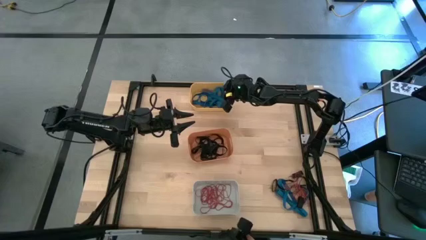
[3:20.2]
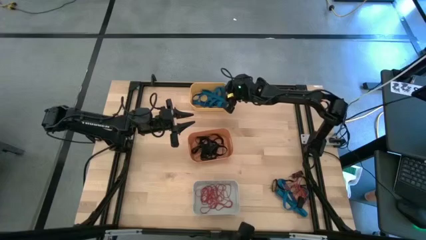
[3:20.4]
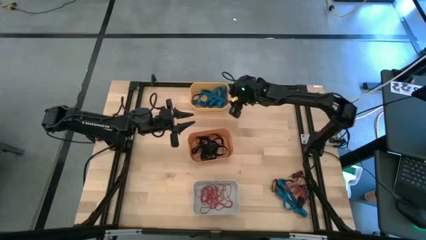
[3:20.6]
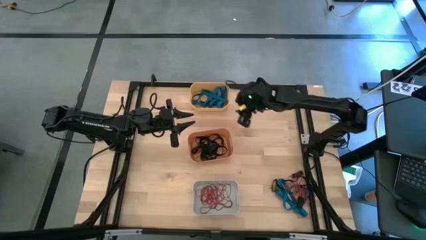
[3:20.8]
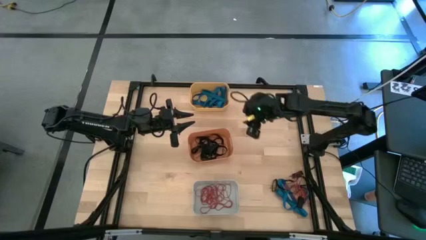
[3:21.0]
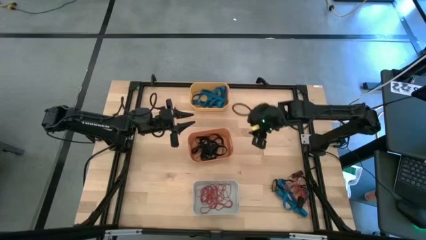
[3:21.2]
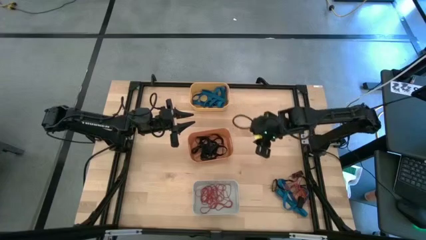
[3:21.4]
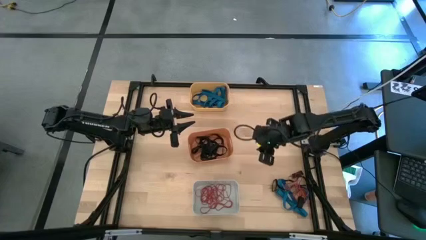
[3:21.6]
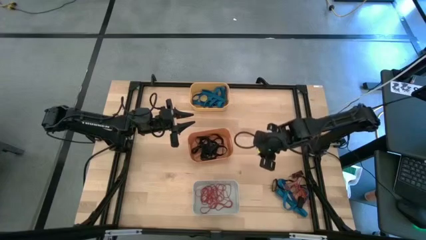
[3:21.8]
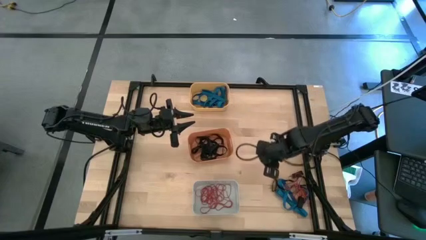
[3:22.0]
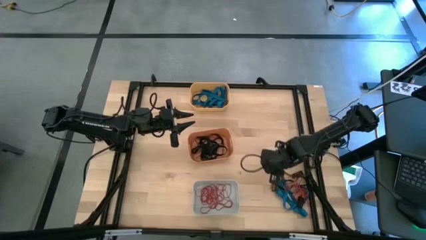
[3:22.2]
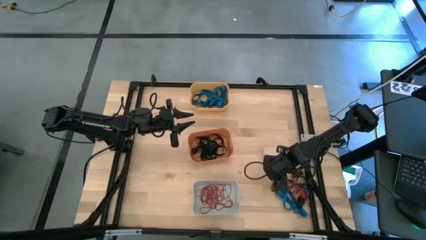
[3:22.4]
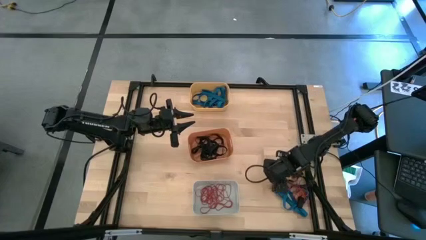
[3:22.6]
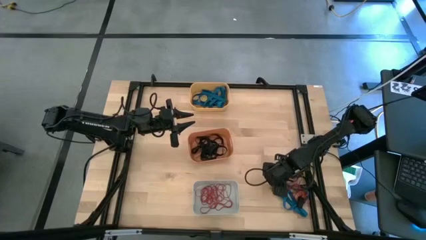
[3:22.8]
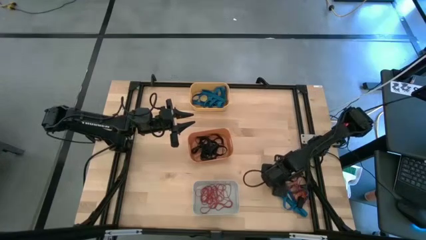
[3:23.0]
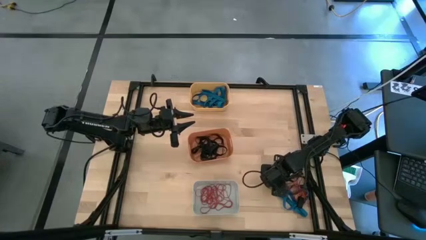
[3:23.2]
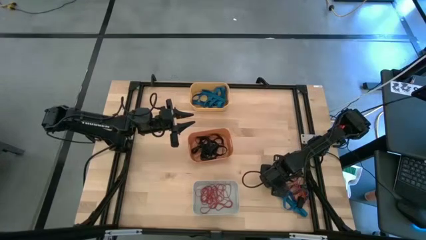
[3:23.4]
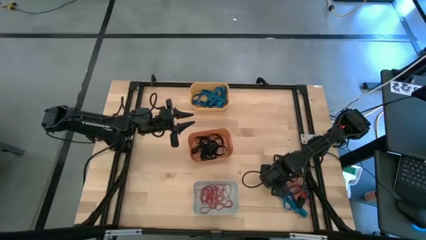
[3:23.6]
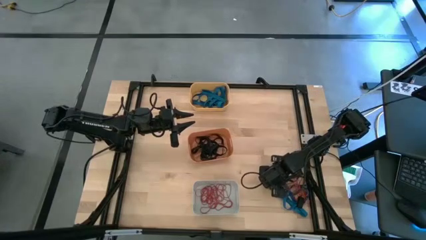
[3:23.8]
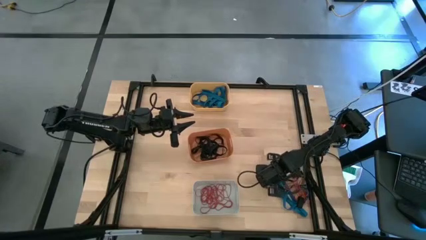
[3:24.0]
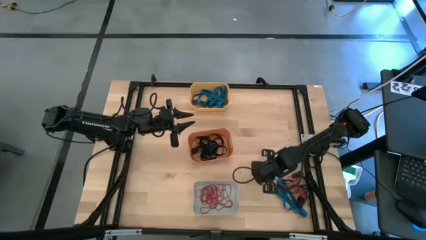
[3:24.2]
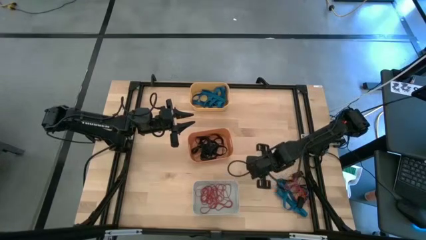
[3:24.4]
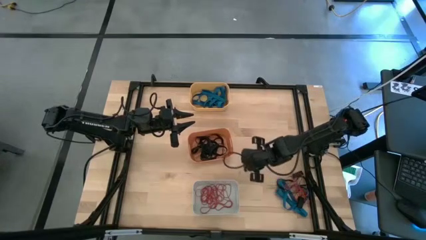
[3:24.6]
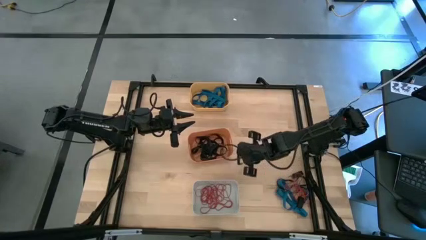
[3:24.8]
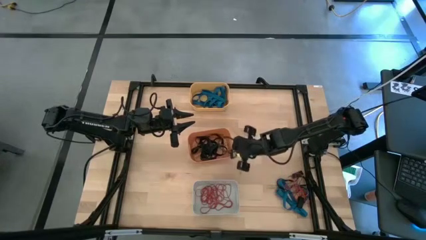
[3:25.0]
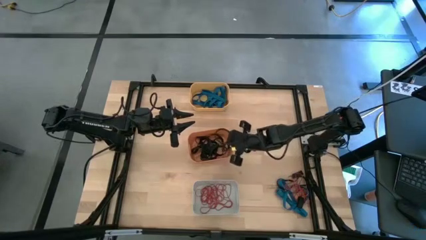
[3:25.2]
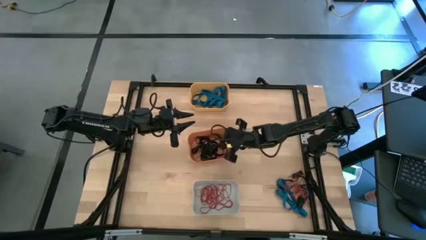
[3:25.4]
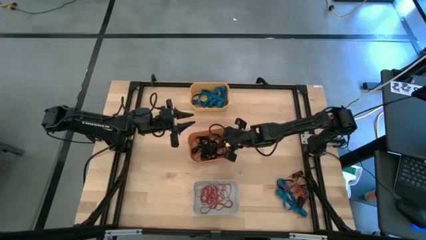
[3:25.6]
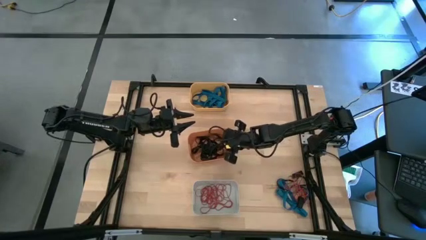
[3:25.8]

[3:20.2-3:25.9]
Task: Sort rubber bands into baskets
Put the black rubber band in the orange bin

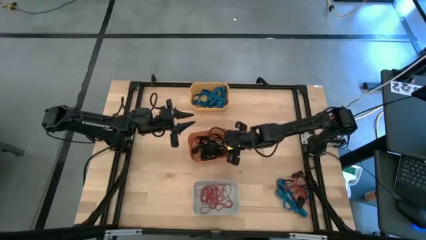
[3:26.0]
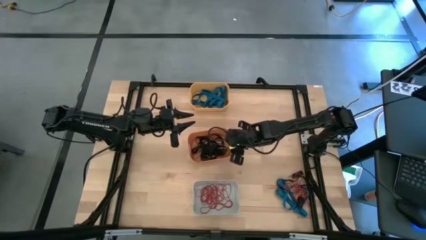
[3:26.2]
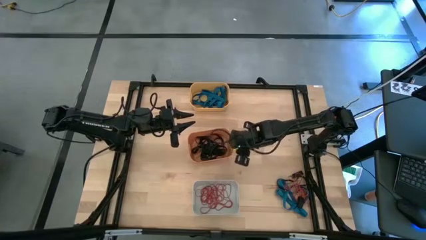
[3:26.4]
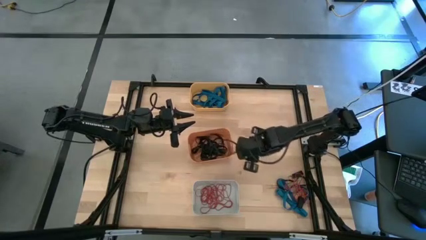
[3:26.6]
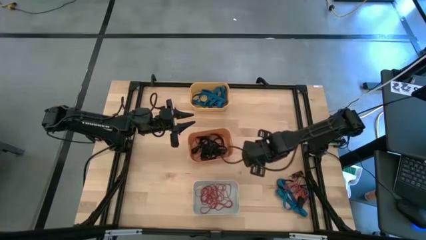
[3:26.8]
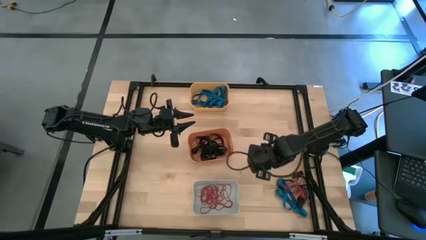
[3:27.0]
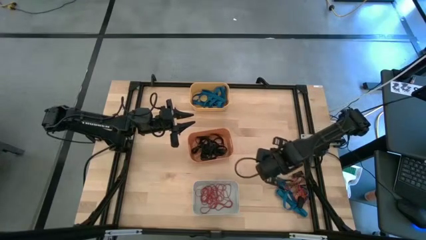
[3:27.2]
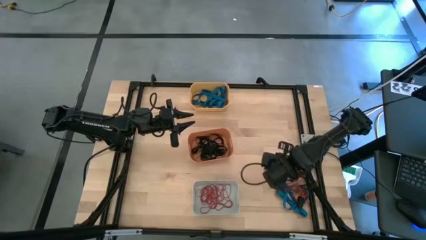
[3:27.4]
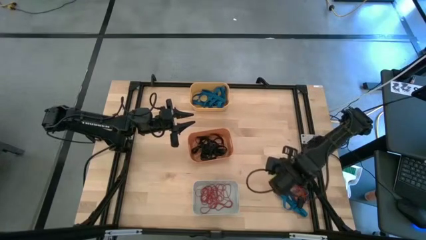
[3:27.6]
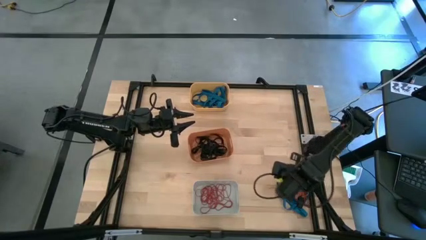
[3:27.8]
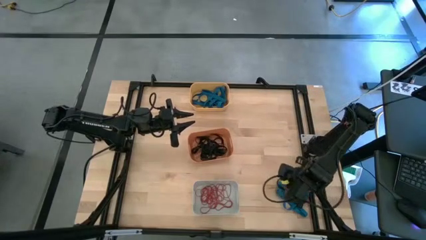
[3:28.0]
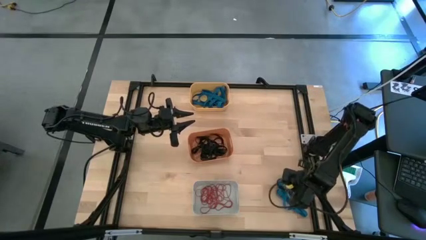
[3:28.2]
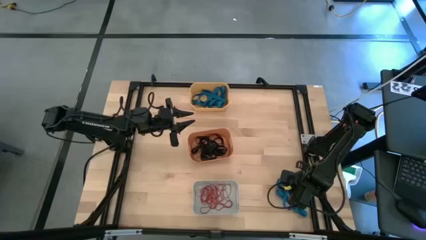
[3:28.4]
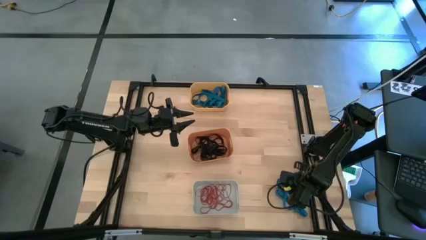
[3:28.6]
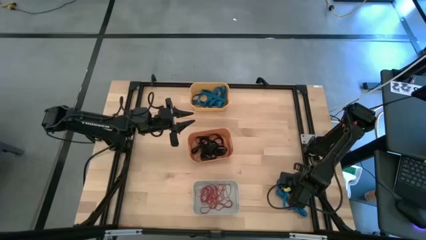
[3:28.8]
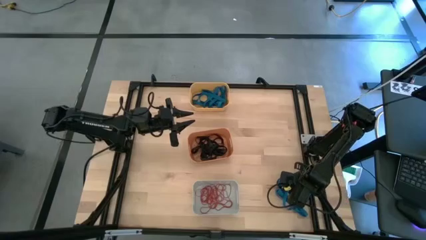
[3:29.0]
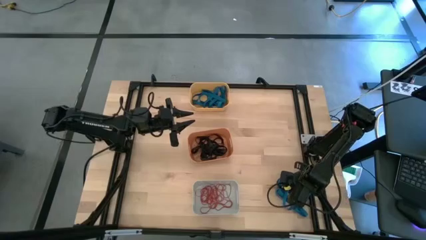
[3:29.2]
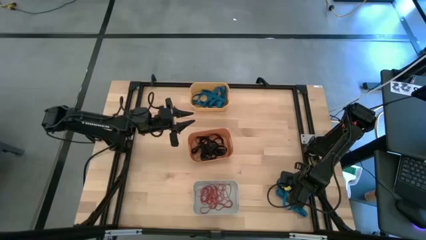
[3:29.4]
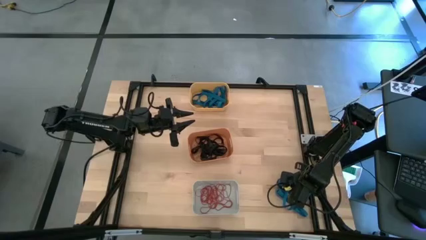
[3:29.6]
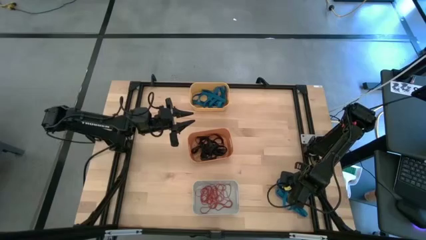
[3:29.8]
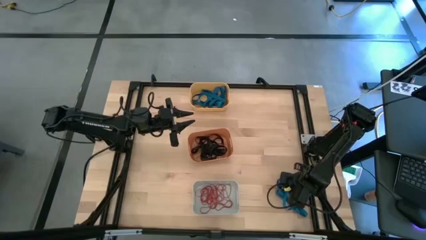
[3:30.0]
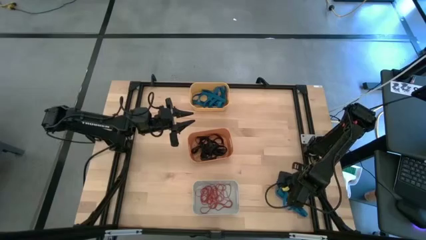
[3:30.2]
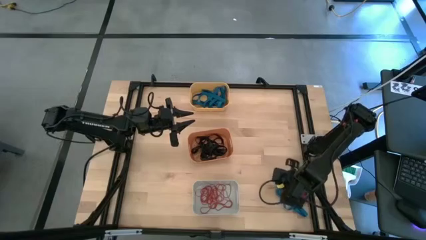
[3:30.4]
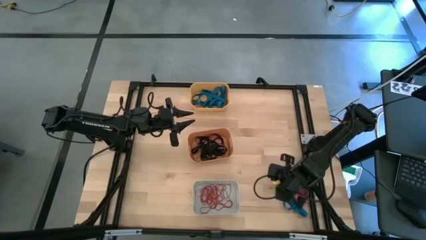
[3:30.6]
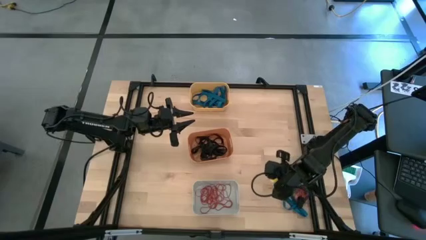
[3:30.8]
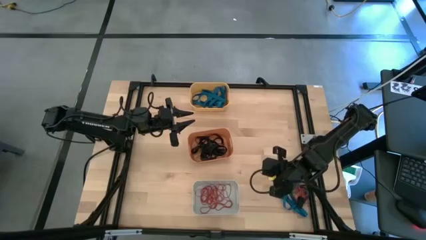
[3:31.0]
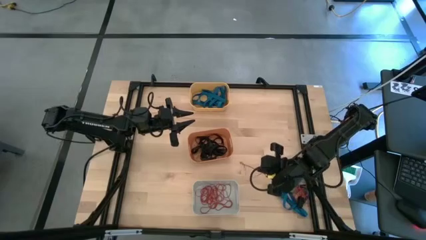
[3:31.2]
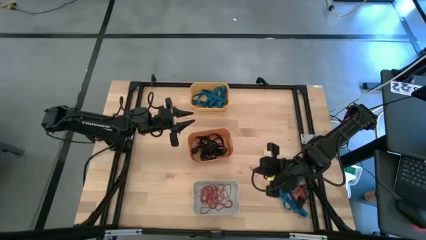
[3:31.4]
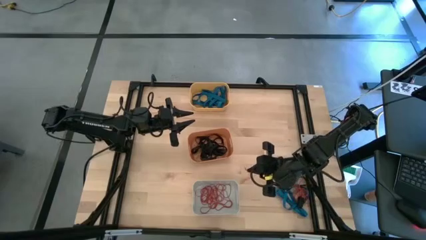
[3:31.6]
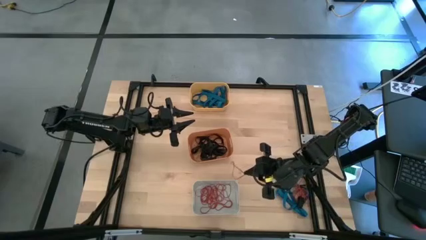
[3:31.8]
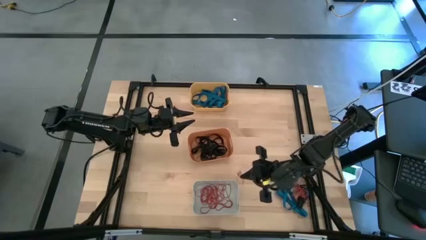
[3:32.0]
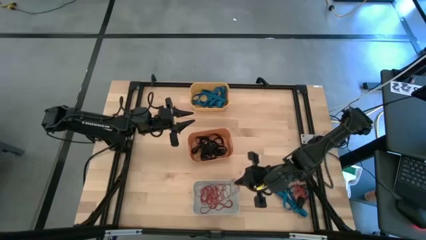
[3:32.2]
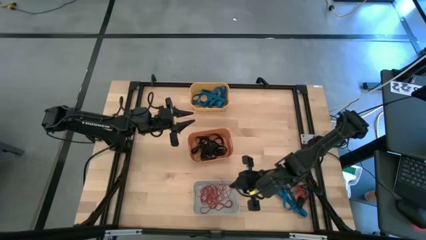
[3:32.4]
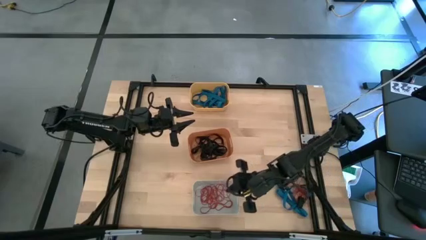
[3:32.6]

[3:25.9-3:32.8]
Put the red rubber band in the white bin

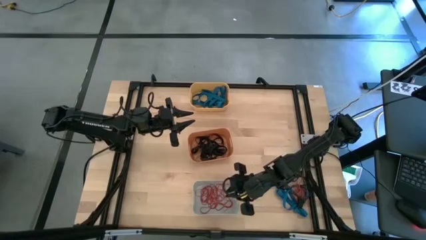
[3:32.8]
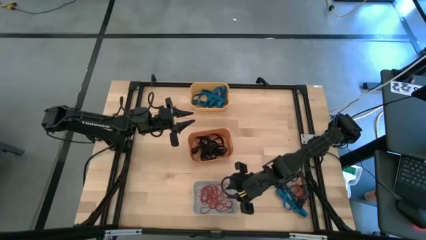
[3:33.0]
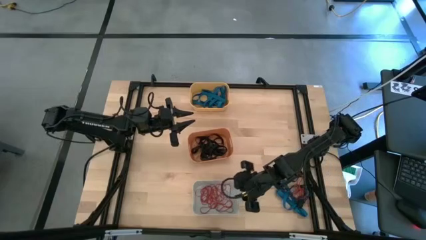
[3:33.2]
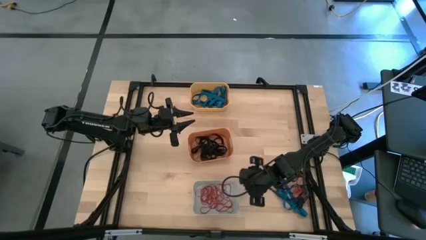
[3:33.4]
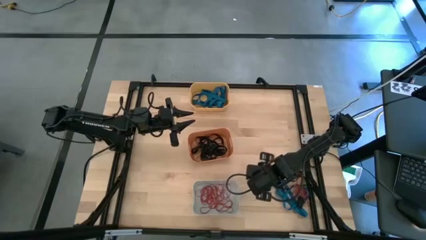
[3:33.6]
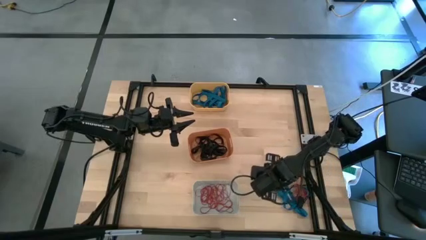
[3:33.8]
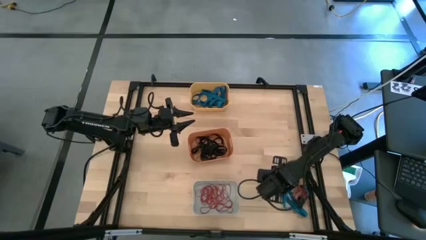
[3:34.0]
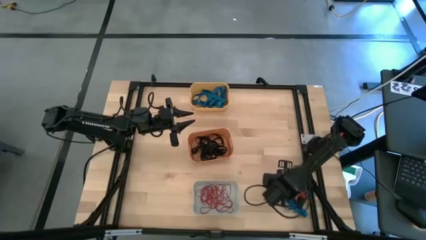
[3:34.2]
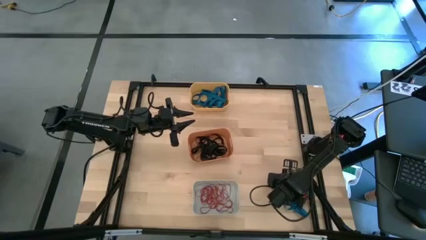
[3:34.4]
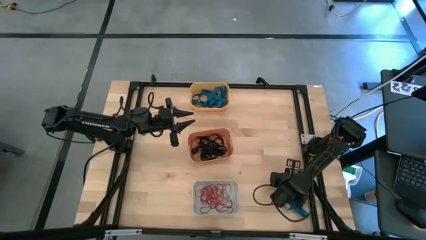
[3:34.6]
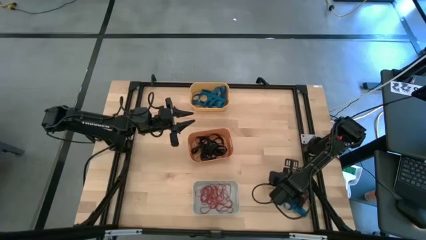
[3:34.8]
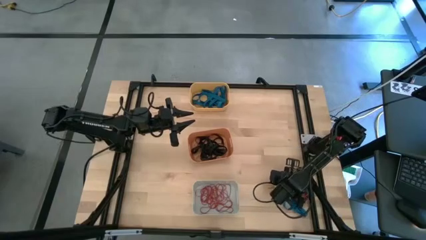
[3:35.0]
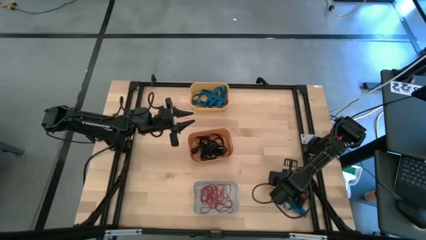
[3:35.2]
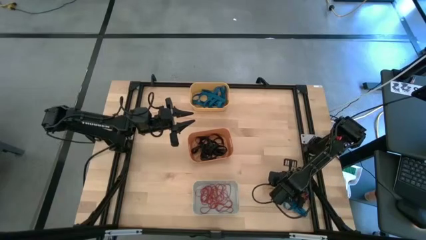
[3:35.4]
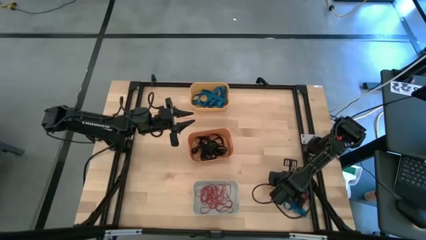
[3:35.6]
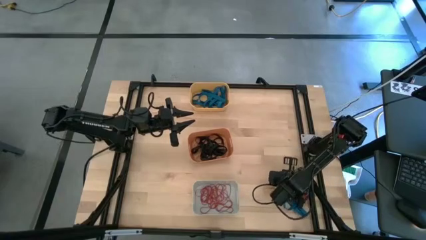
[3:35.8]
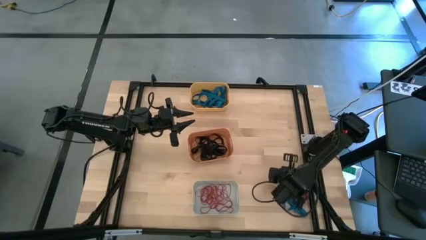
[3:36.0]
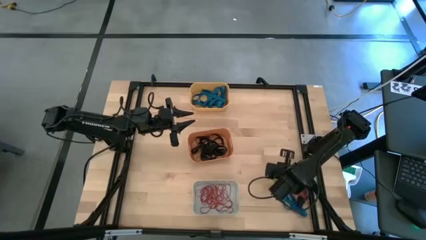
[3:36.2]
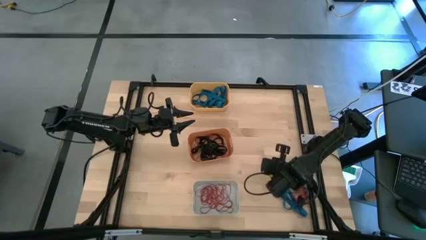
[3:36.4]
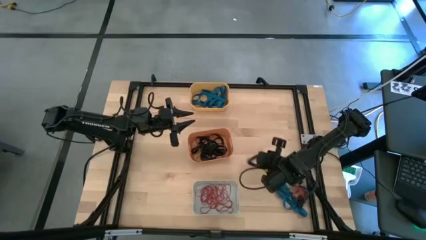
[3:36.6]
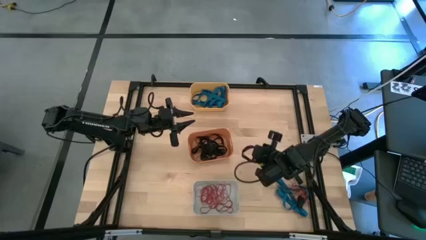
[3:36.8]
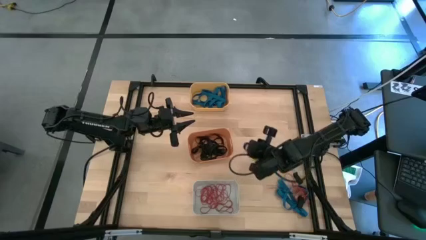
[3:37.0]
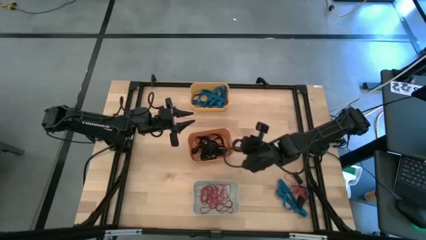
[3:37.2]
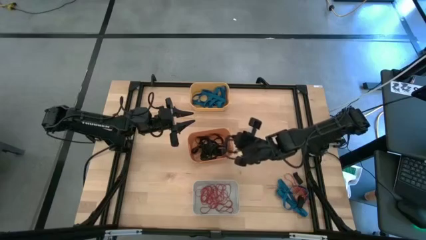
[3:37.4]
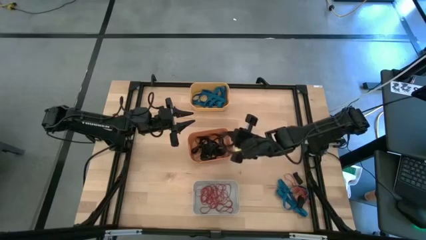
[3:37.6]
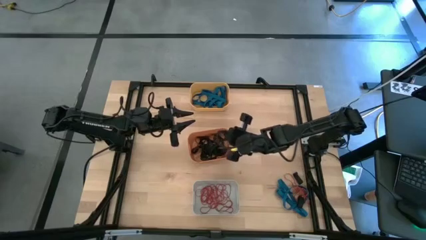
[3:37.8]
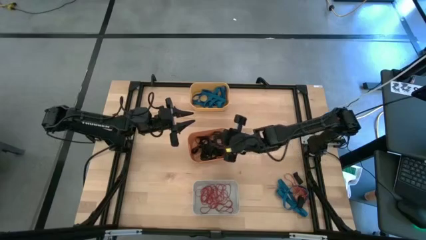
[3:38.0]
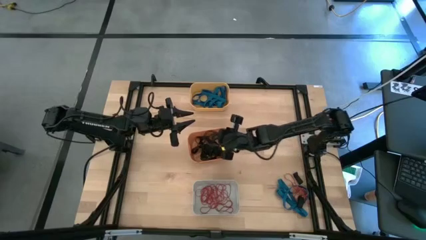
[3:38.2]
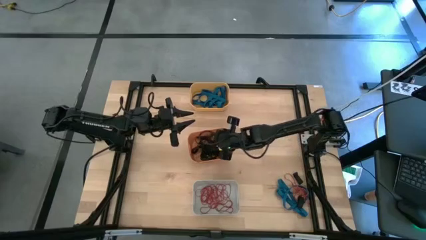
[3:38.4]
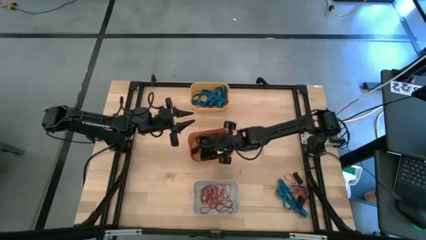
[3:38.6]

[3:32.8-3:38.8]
Put the black rubber band in the orange bin
